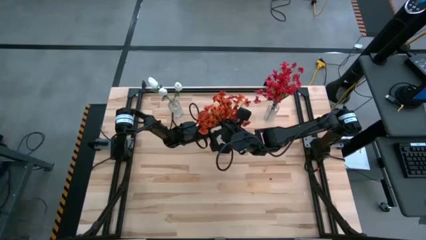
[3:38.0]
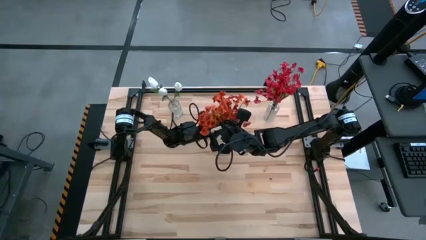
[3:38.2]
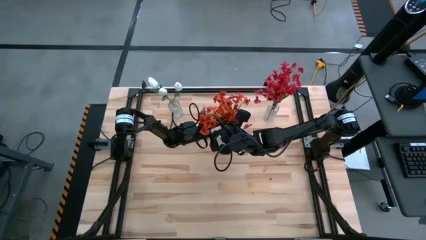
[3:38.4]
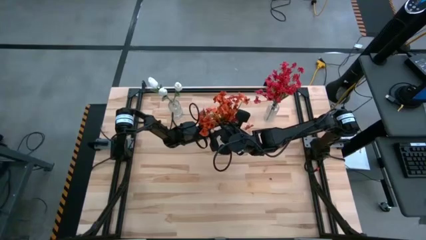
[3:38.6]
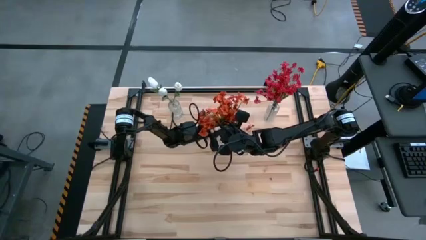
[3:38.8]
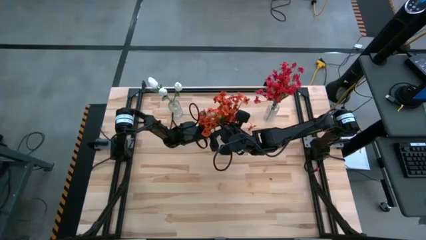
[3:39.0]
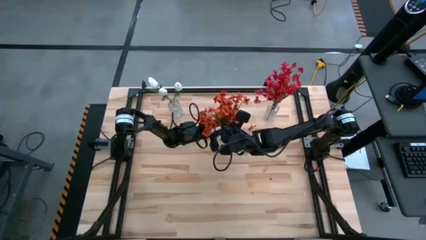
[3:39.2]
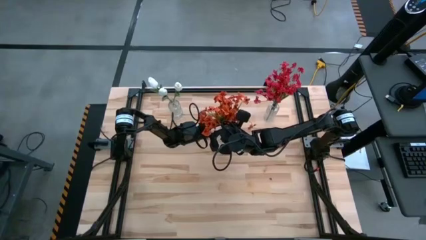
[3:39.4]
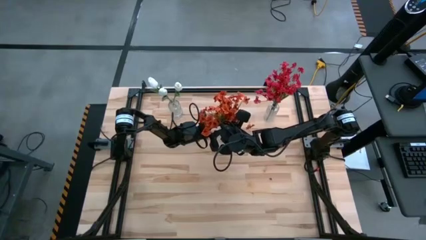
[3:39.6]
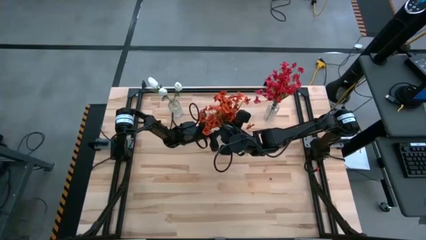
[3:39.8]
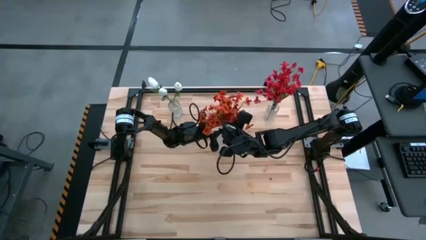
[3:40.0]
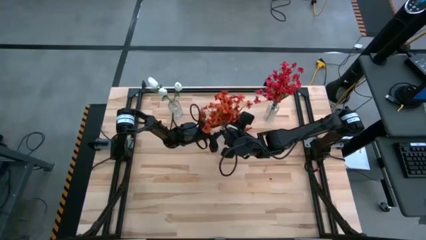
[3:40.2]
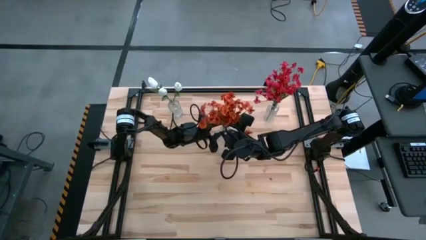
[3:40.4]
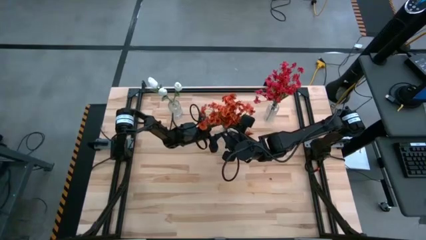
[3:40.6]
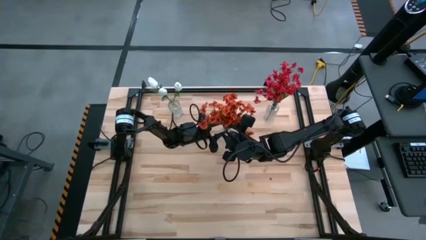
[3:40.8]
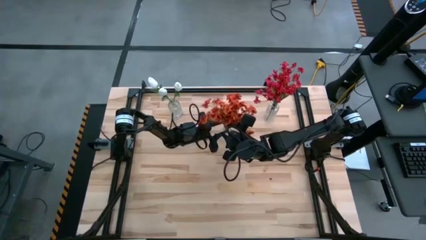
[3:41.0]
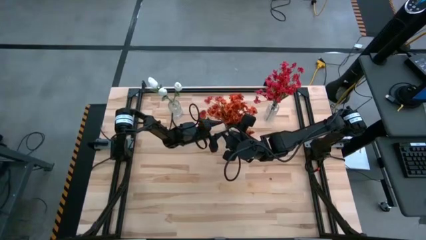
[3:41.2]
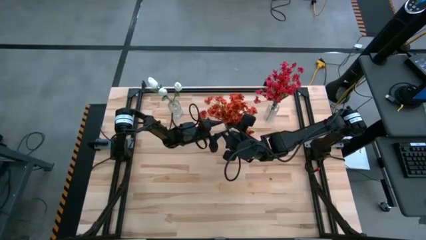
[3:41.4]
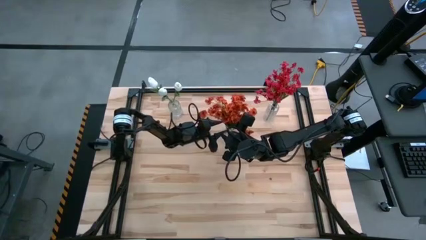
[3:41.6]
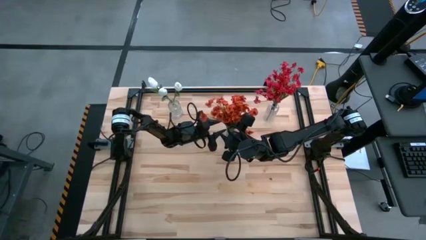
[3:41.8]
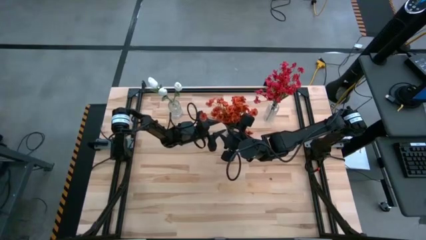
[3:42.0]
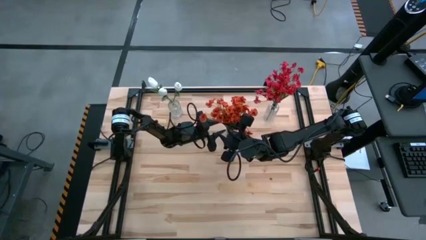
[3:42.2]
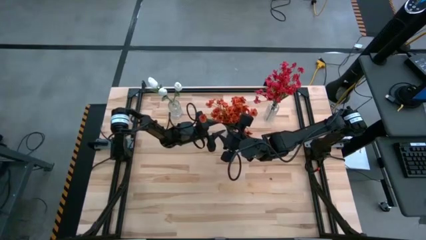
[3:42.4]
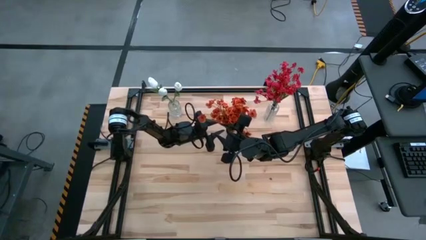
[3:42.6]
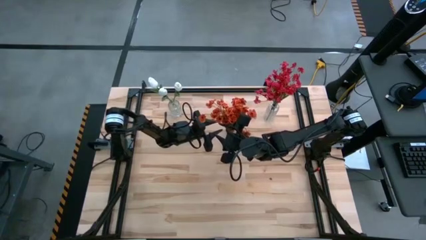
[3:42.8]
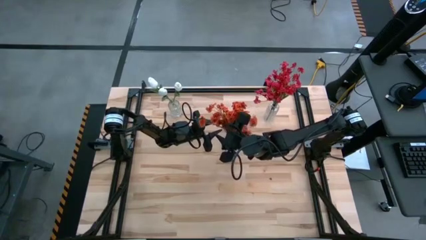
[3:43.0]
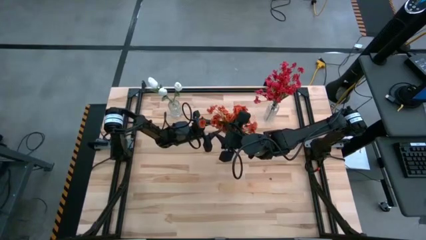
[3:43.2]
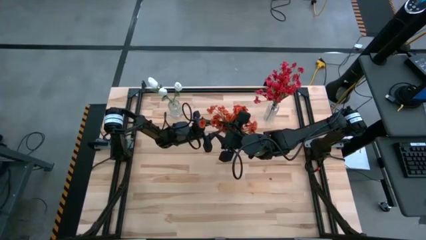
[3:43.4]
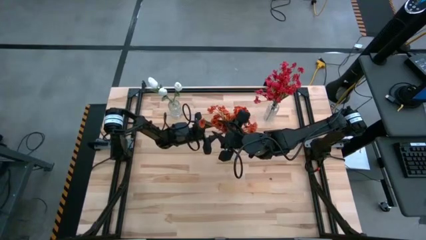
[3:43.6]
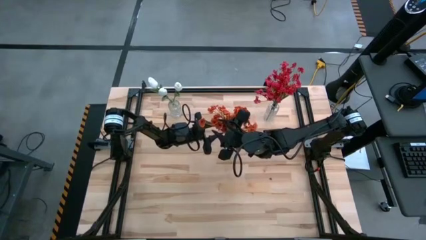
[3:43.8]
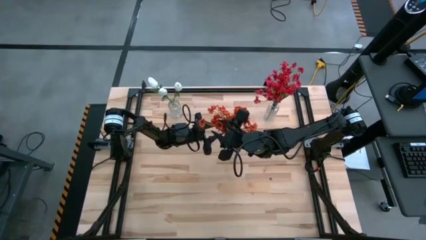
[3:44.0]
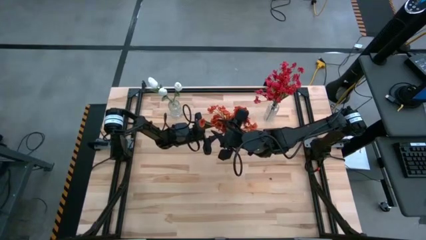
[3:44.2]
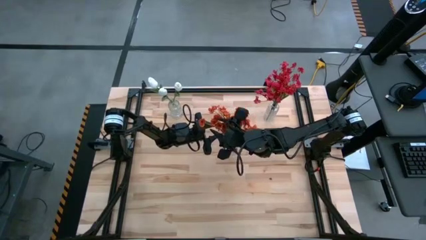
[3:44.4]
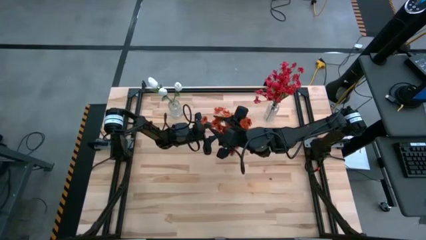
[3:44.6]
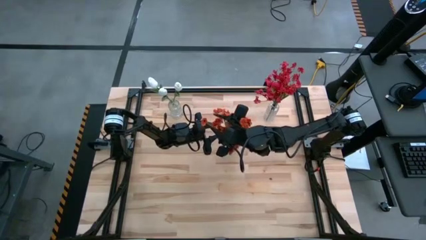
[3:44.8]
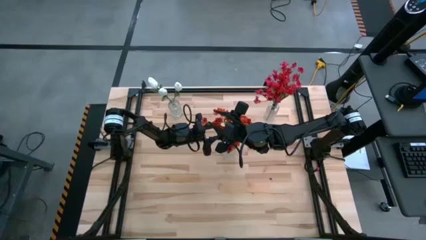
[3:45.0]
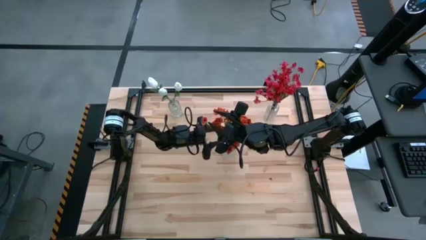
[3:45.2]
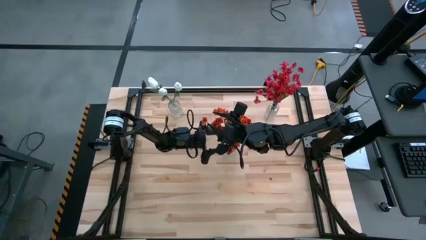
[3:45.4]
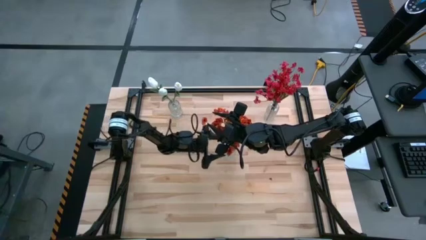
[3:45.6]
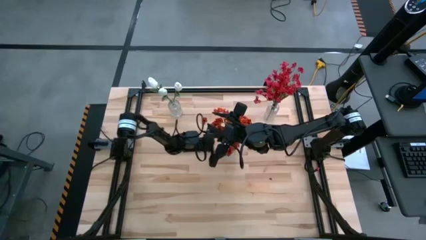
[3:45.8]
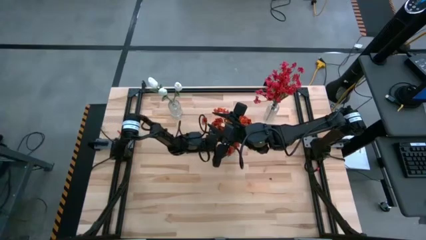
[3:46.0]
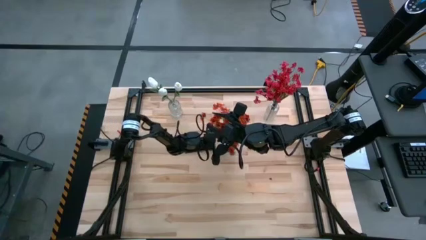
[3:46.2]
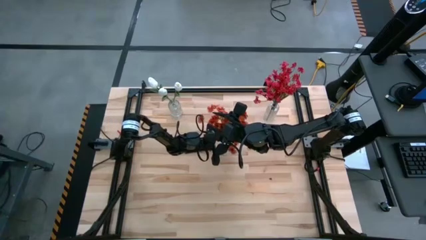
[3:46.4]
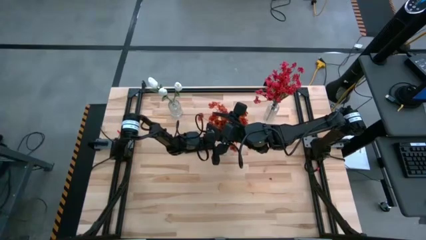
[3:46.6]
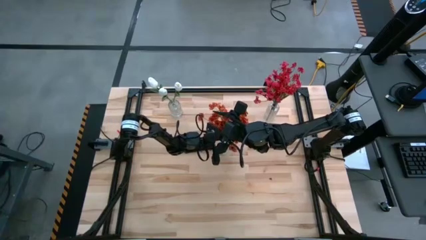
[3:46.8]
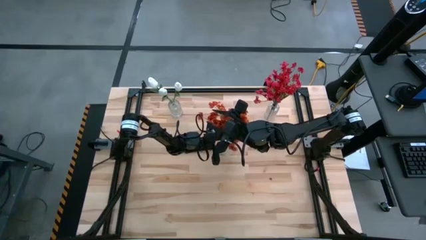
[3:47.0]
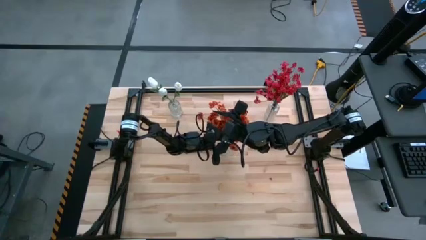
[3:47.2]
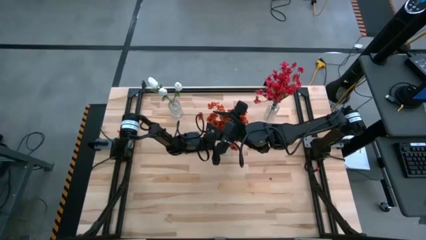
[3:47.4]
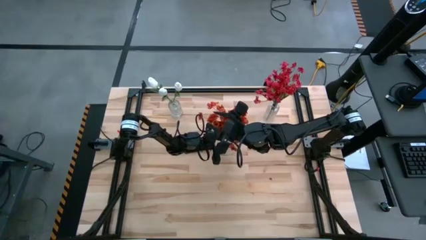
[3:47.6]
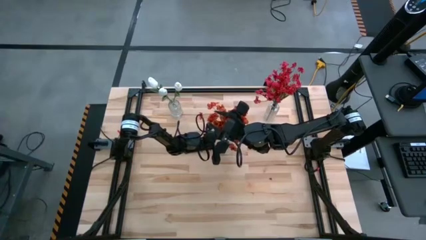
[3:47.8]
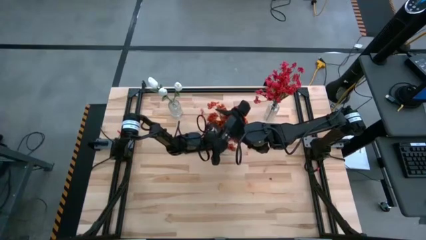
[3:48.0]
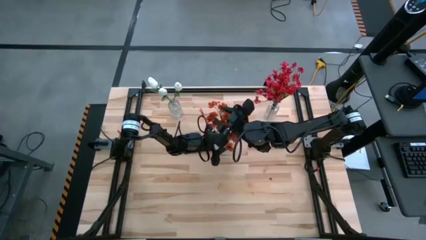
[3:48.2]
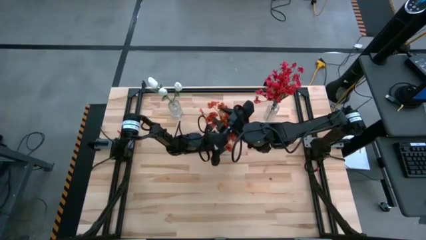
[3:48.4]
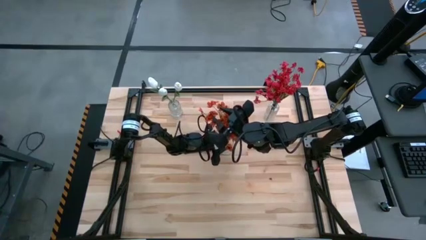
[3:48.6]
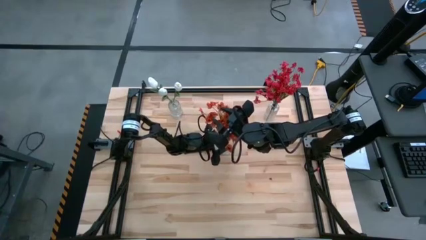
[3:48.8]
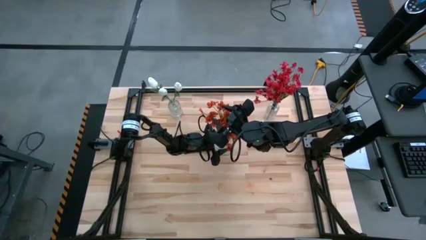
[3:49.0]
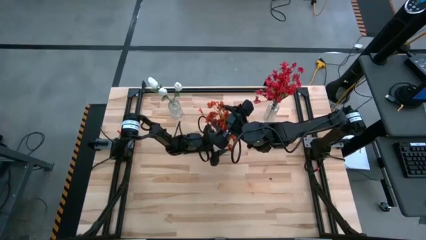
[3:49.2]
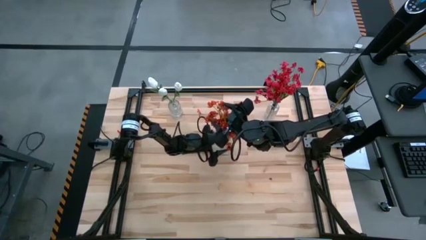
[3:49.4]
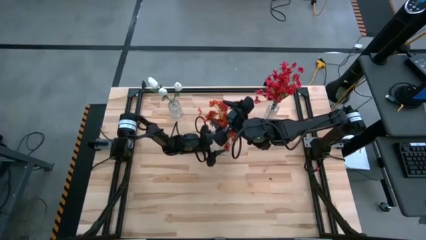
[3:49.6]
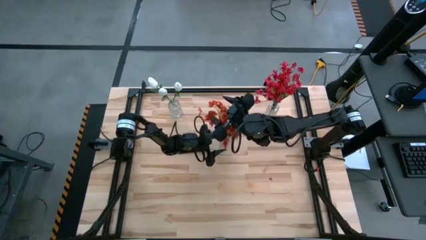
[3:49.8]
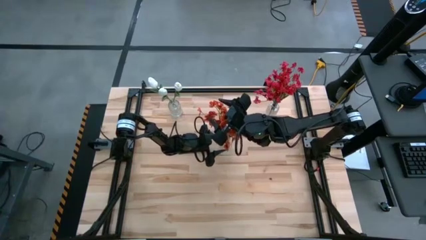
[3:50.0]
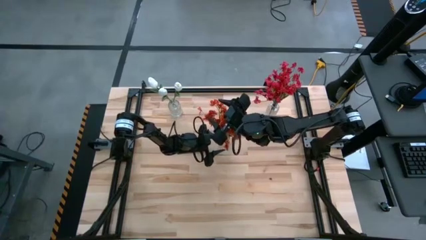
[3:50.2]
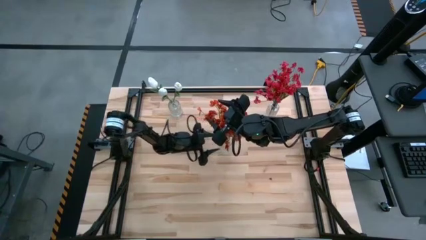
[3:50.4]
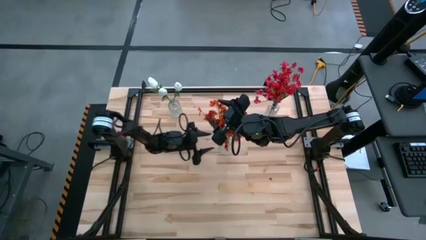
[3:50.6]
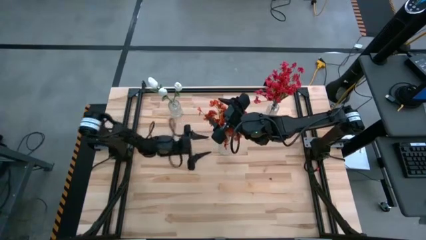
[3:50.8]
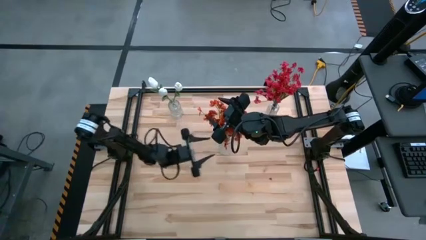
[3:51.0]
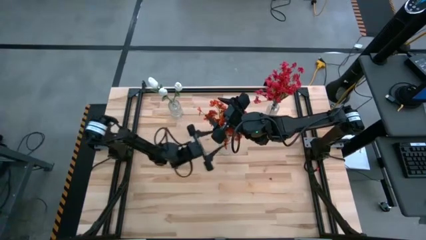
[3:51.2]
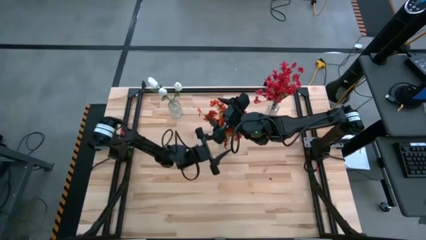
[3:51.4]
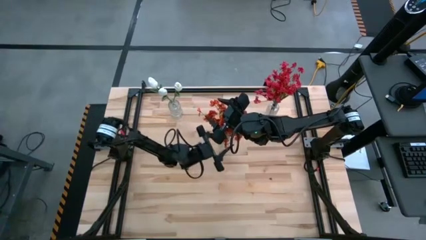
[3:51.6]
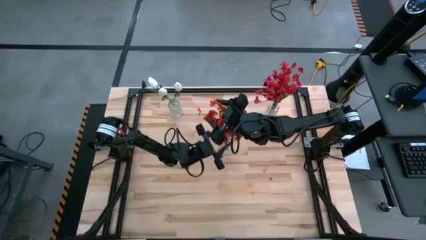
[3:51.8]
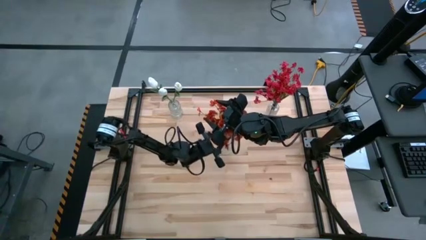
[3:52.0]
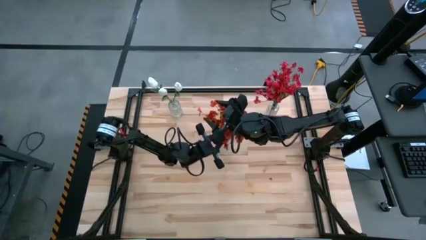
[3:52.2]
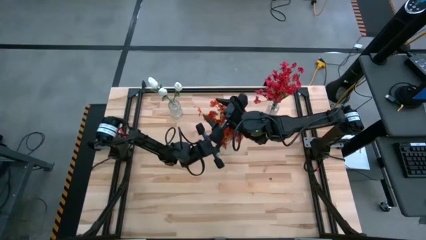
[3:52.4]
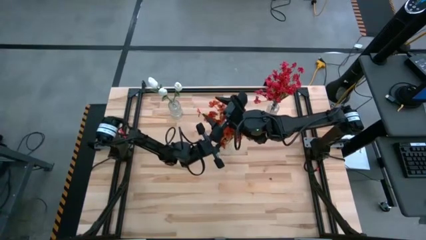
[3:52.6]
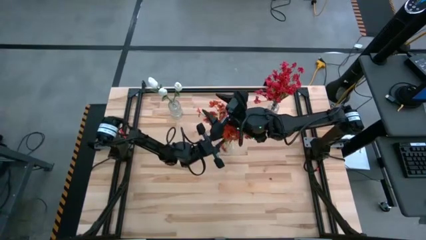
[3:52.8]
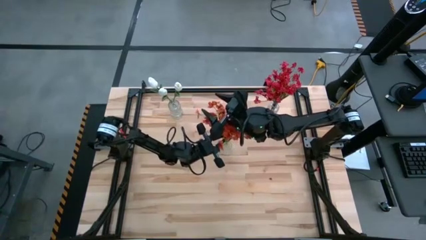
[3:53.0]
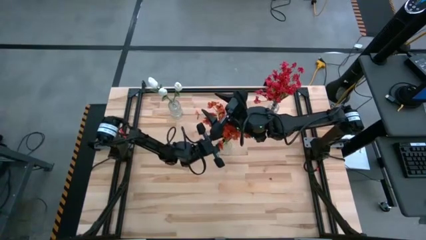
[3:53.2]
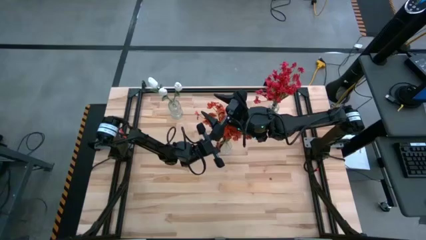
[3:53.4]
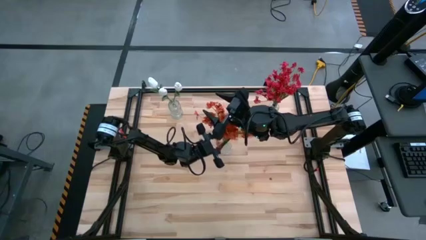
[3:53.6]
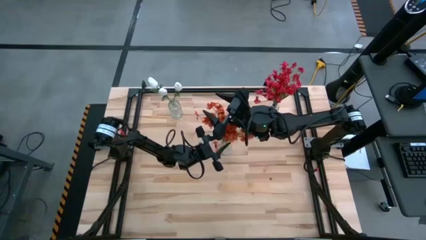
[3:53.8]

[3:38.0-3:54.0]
Task: Sort flowers into vase by color
Put the orange flowers into the bottom transparent vase

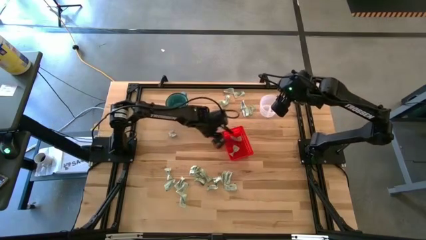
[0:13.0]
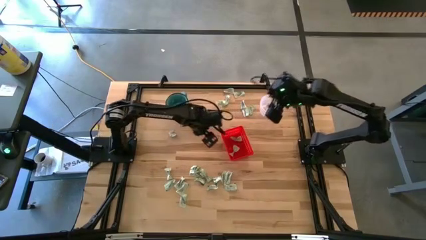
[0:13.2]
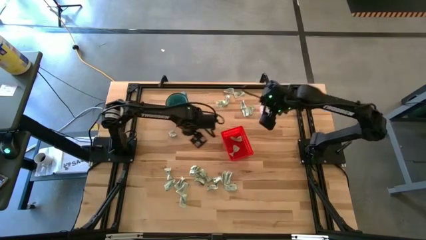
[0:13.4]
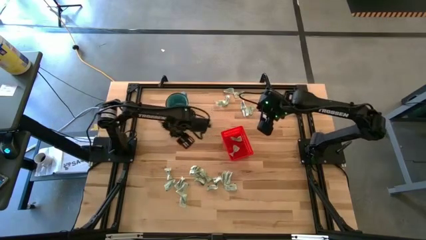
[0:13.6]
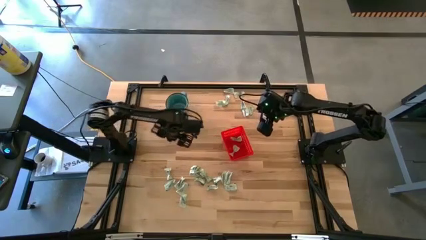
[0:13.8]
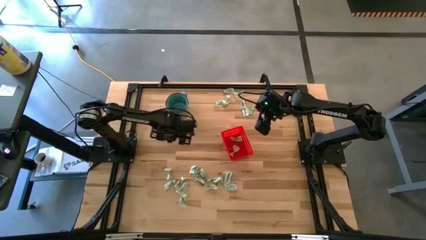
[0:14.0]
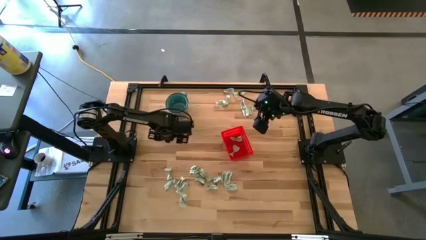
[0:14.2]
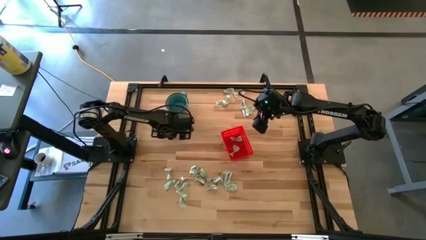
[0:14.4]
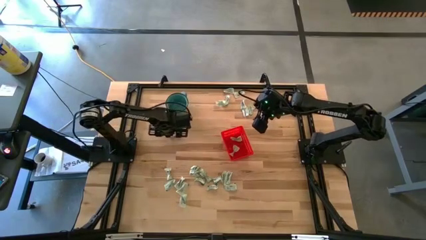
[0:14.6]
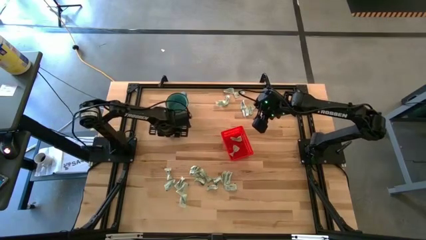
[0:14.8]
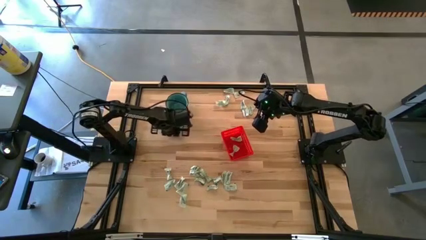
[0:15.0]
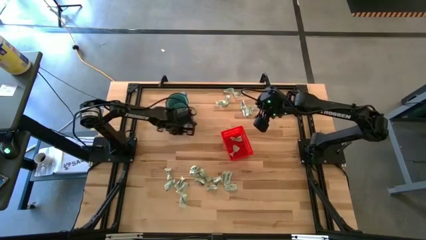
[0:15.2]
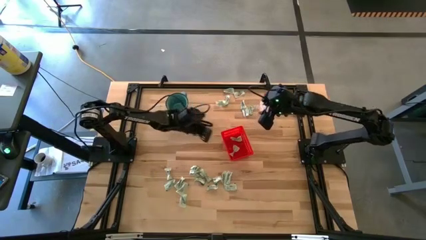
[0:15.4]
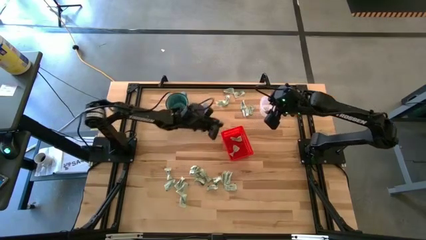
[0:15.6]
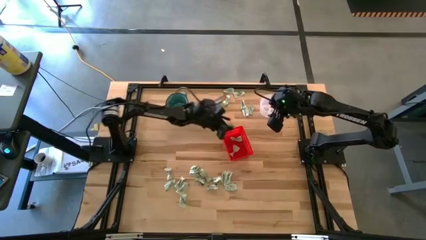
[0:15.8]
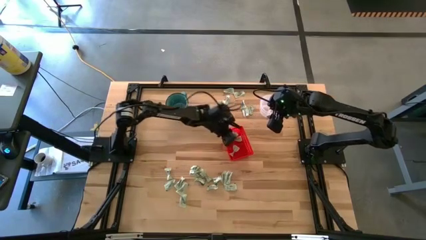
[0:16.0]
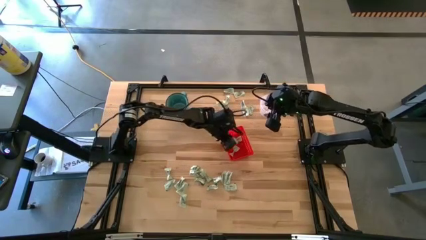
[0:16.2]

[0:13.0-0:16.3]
Task: Pick and place items into bin
Put the stevia packet into the orange bin
